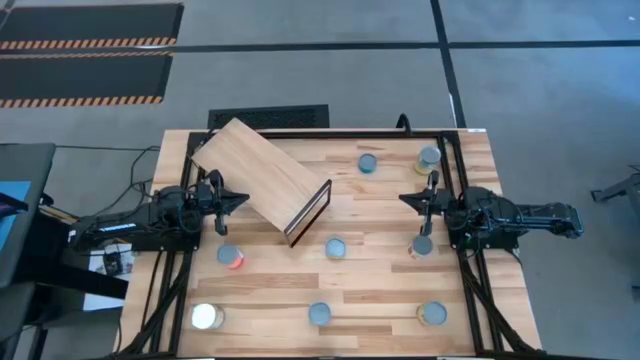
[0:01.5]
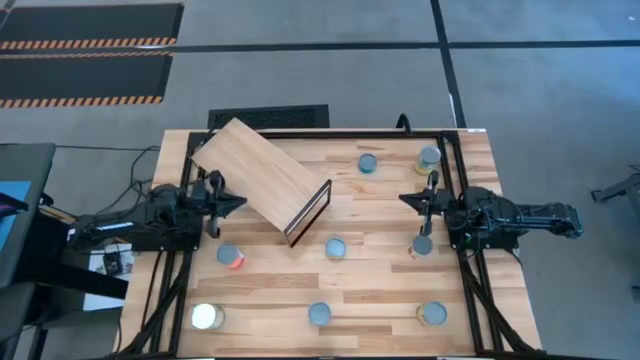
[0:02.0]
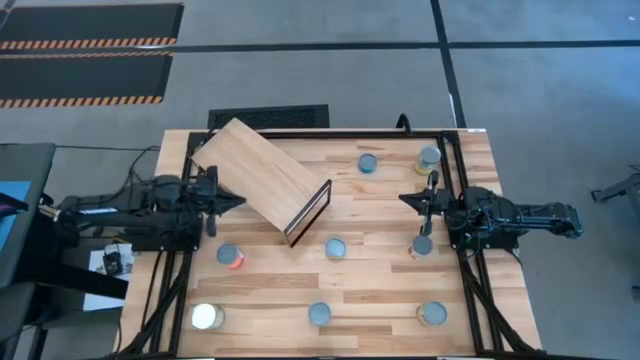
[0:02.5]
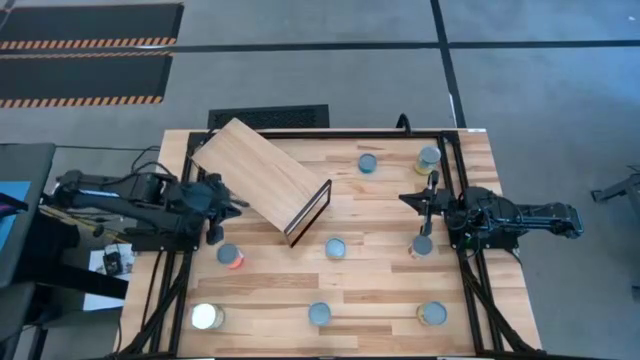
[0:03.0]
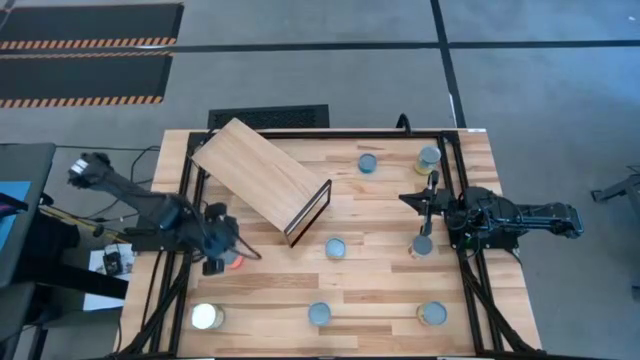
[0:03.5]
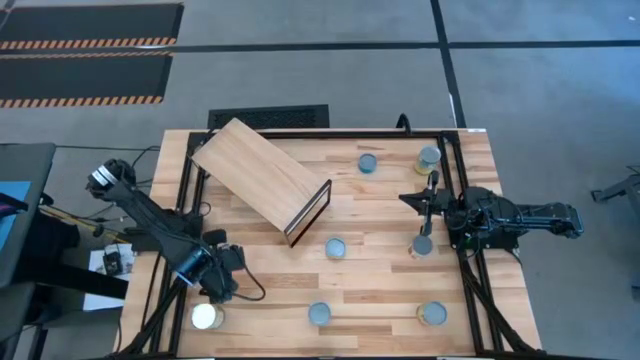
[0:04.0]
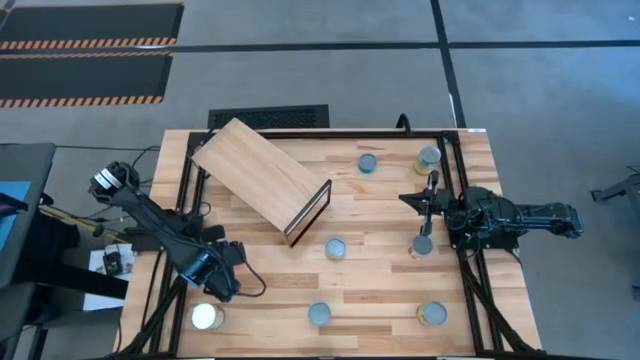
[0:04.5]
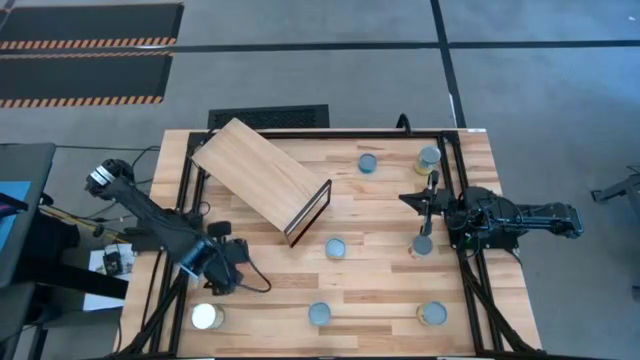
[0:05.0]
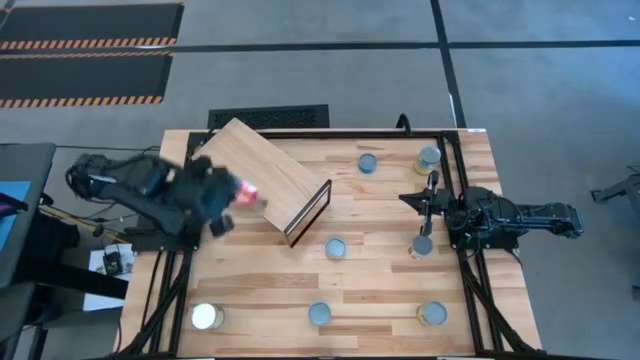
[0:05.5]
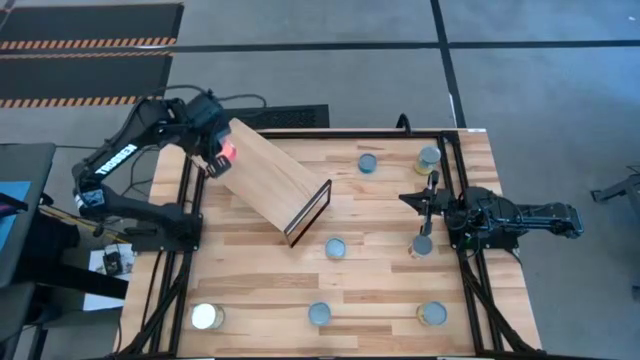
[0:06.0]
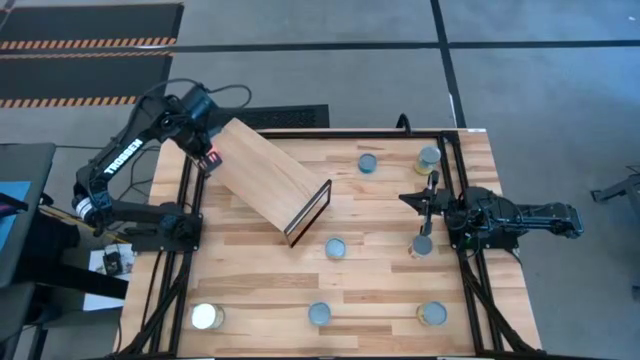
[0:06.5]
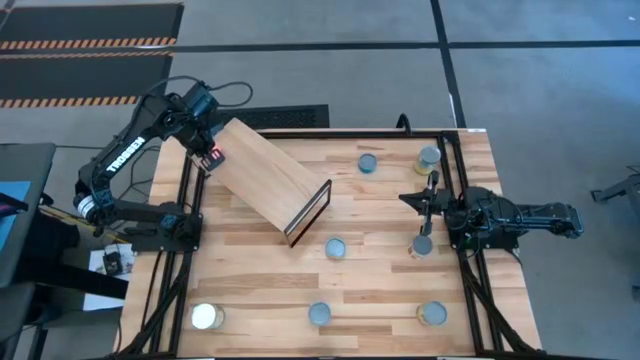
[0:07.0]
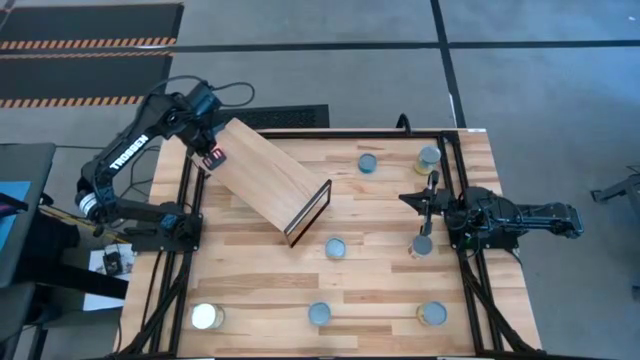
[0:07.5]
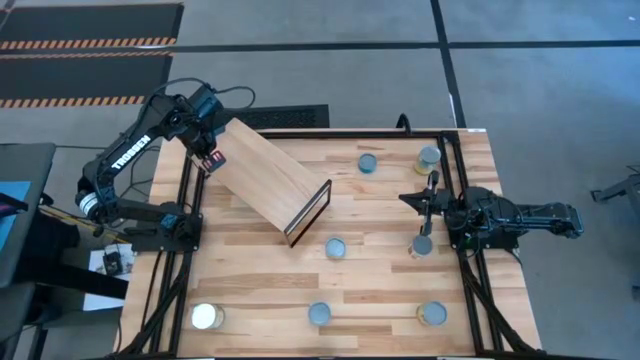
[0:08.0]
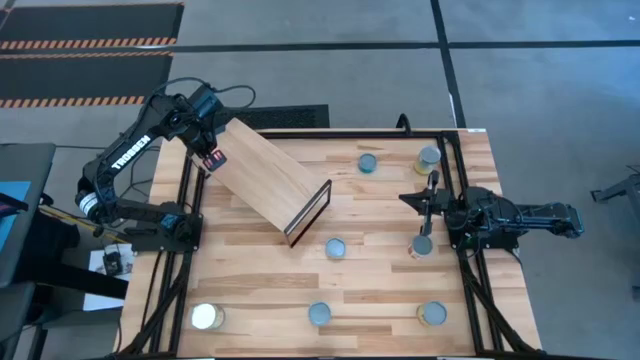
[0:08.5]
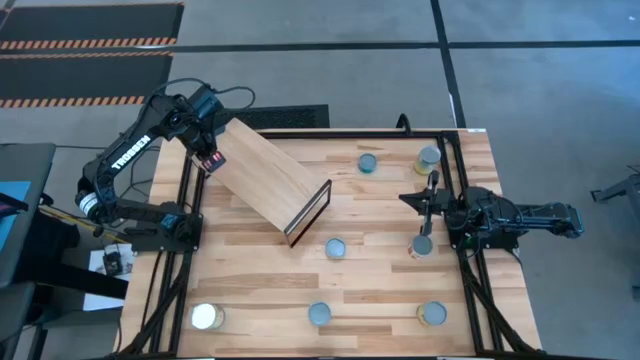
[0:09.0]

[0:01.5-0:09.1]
Task: Pick and place cans onto a shelf
Put the canned pineapples on the shelf

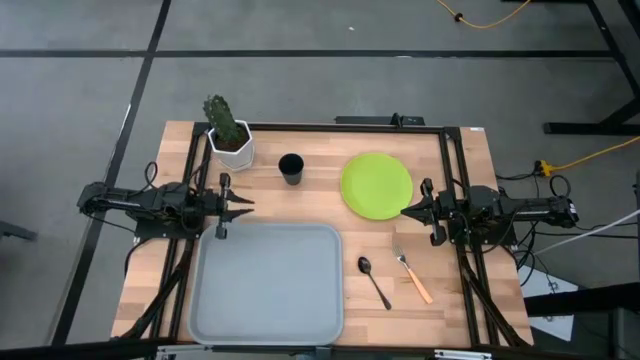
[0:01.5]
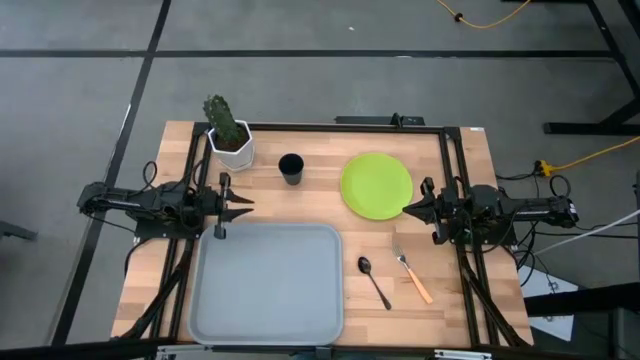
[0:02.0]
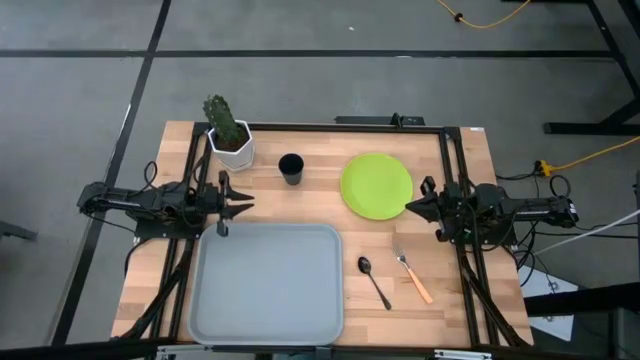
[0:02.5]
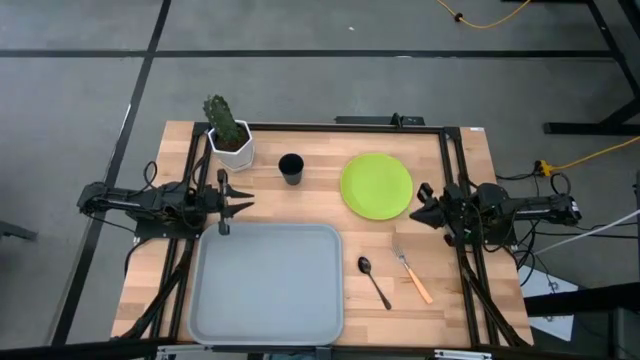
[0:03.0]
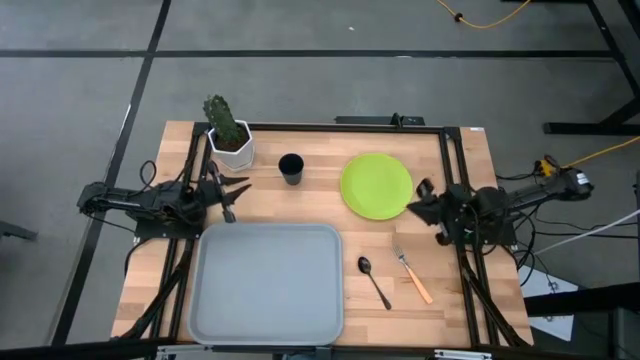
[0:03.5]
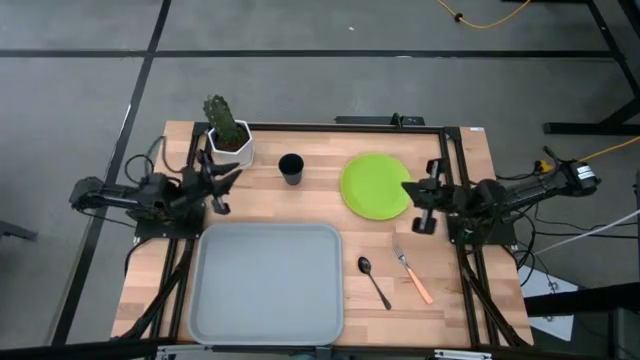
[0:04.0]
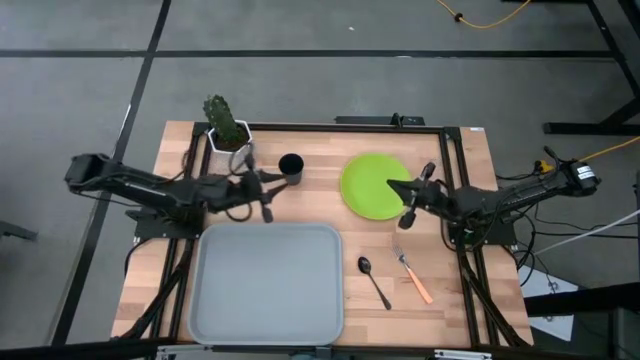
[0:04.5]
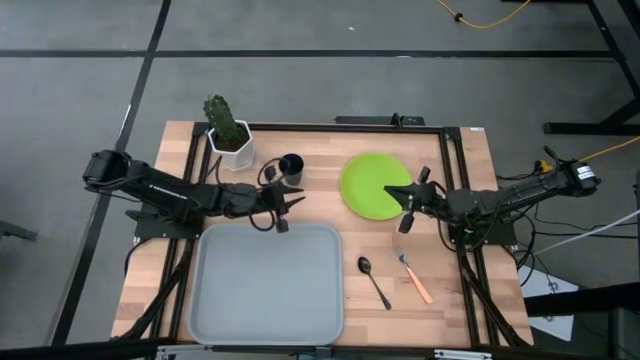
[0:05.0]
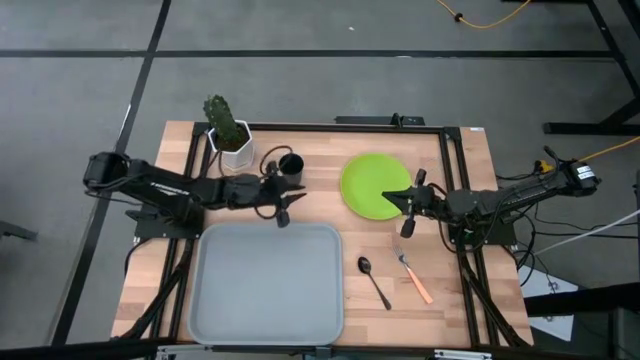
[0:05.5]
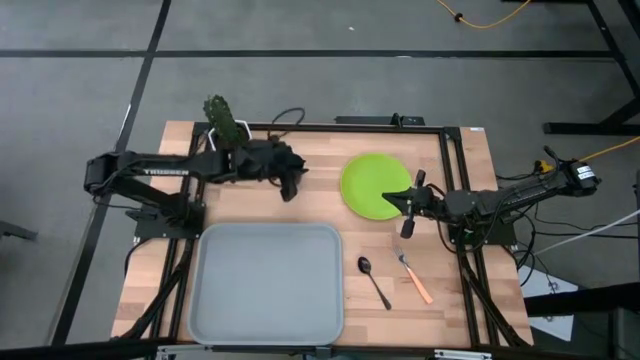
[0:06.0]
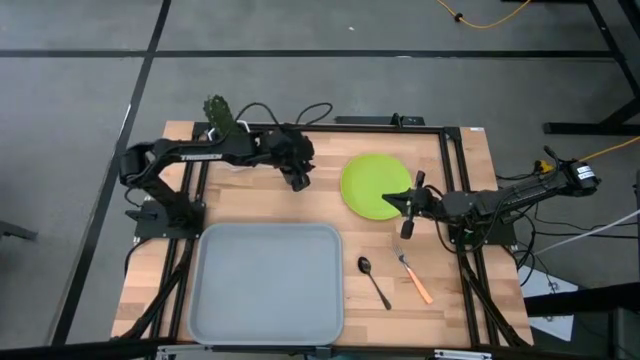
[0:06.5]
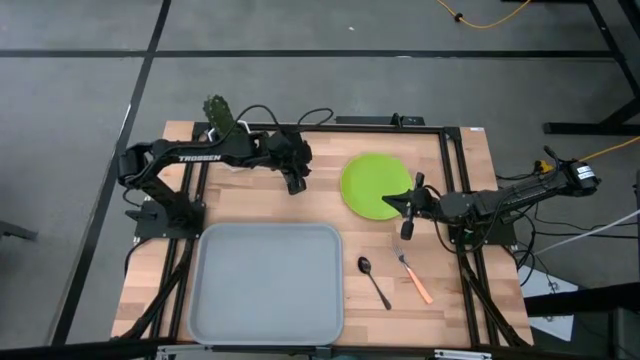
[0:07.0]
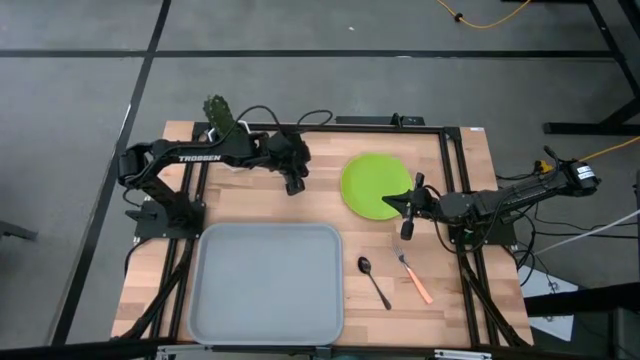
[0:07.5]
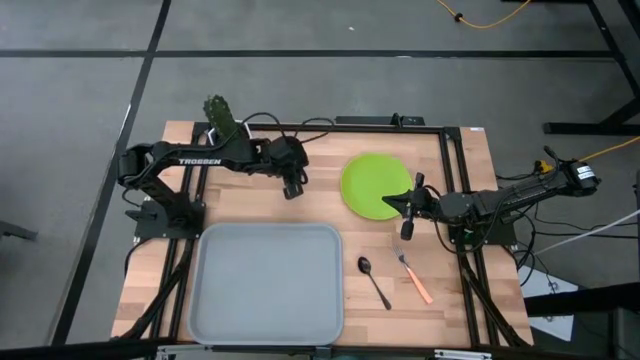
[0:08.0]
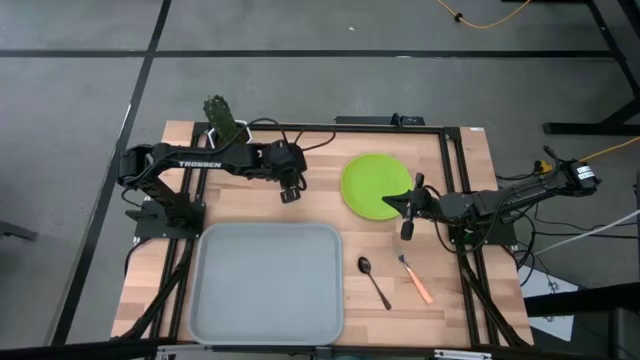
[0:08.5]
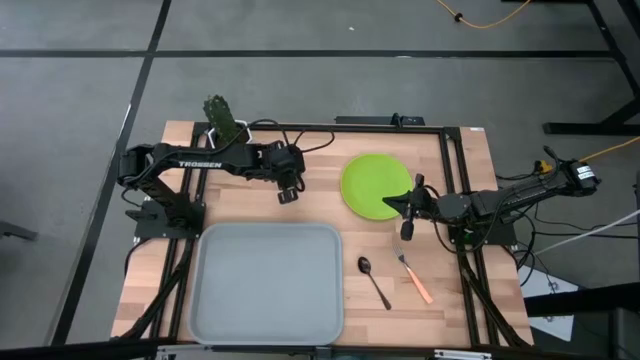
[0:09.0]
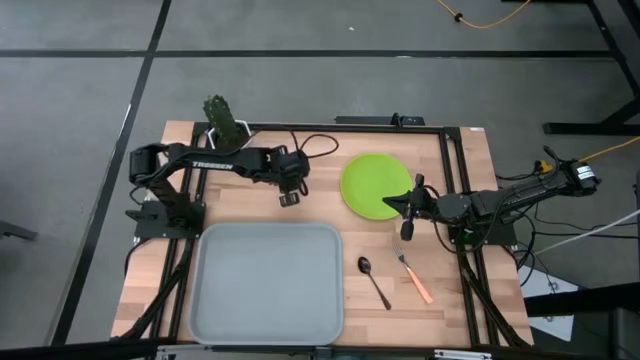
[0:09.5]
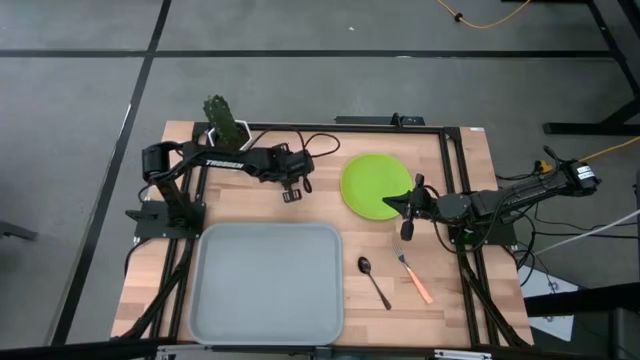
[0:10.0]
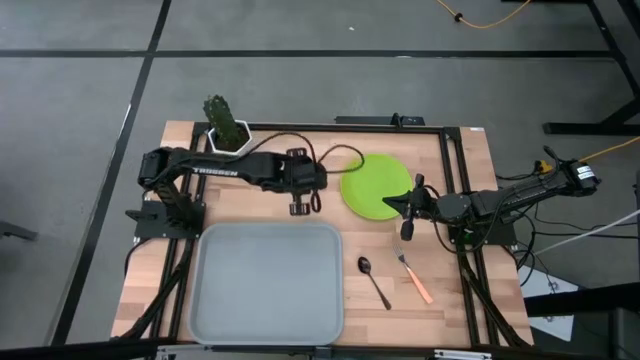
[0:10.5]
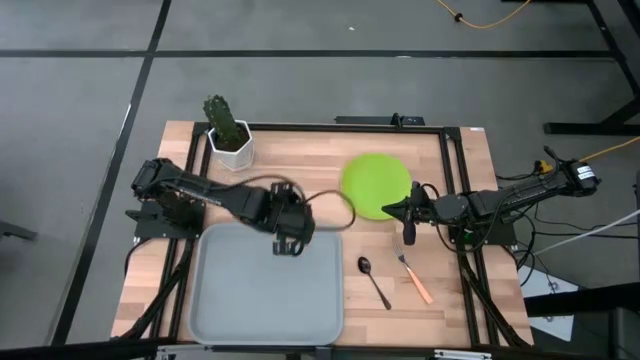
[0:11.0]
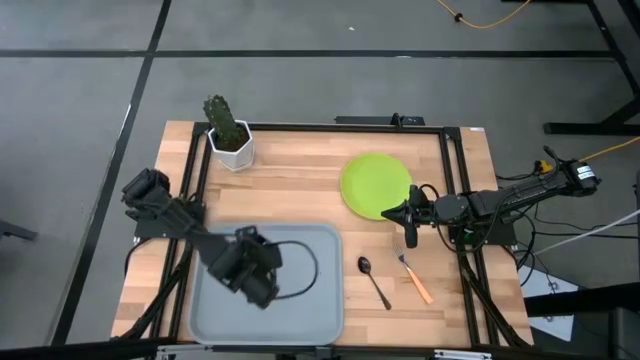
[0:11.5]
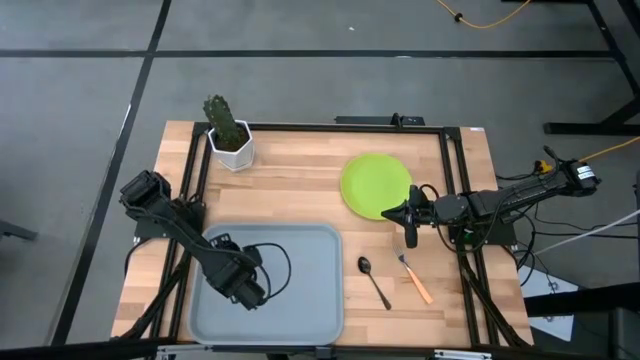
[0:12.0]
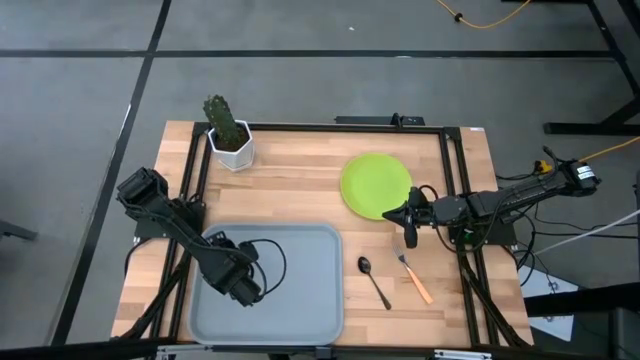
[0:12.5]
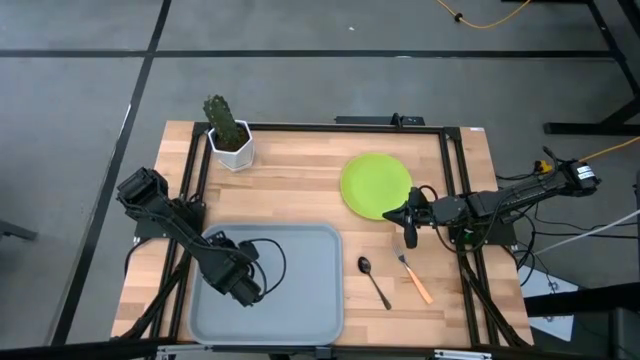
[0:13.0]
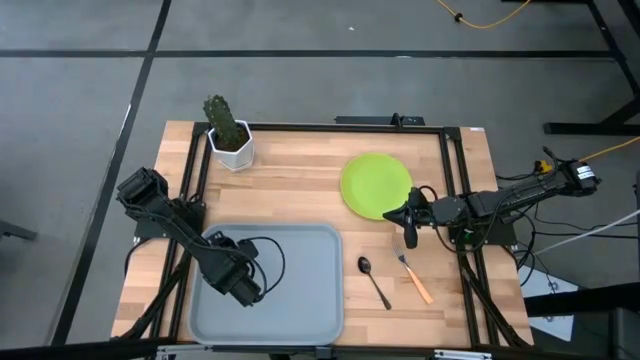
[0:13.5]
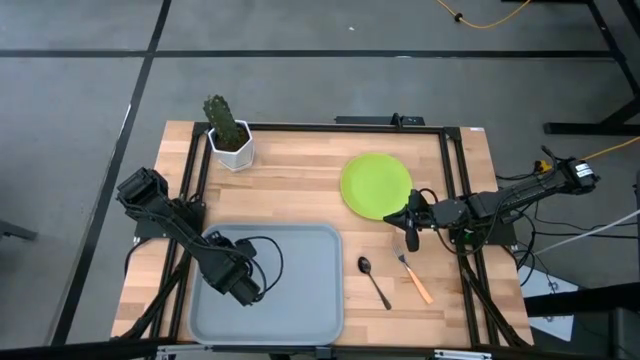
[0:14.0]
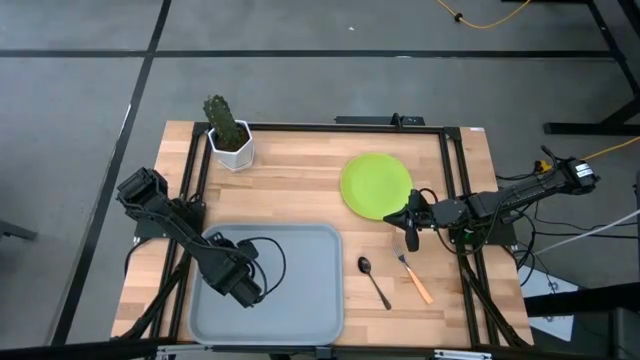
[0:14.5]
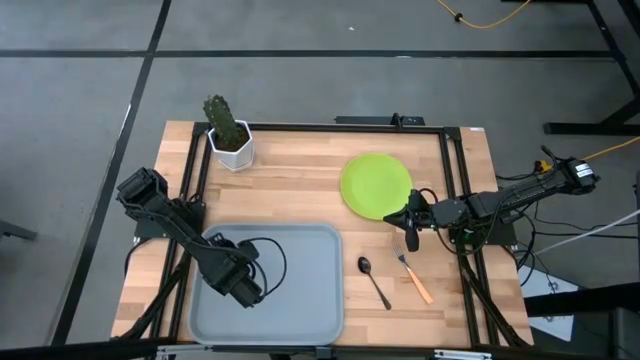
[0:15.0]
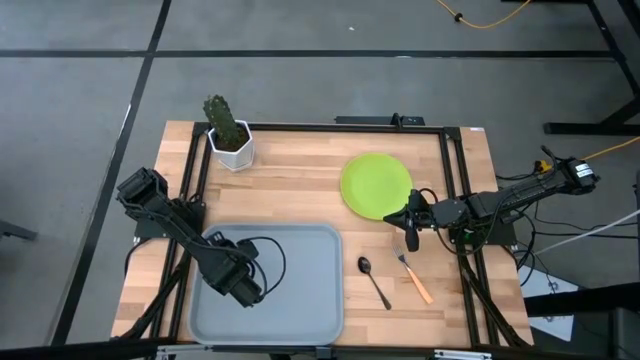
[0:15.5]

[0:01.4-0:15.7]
Task: Pick and place plate/cup/fork/spoon on tray
Put the black cup on the gray serving tray
